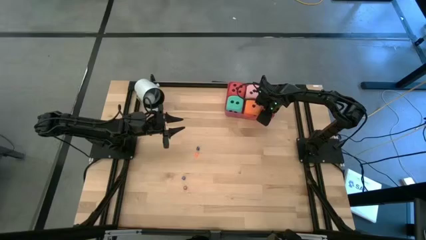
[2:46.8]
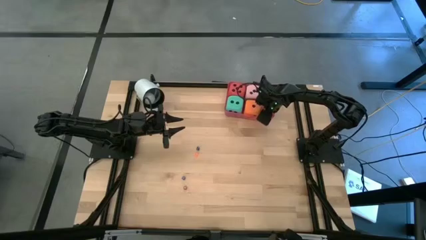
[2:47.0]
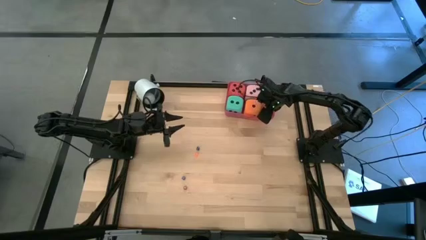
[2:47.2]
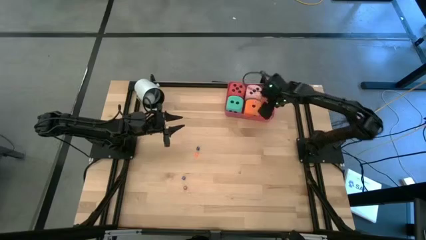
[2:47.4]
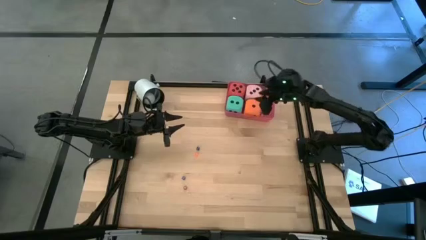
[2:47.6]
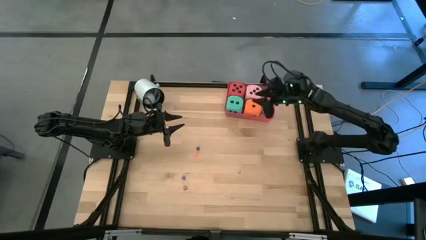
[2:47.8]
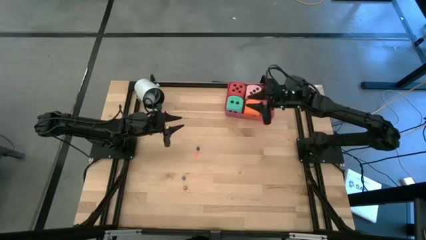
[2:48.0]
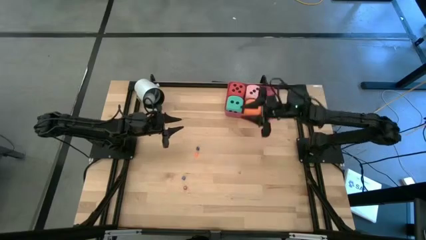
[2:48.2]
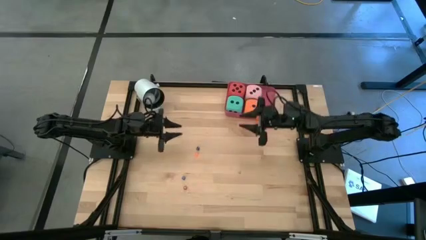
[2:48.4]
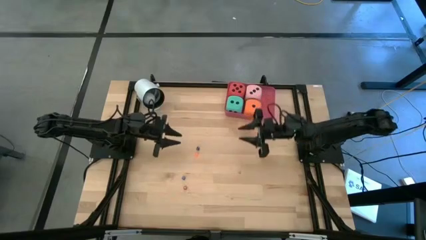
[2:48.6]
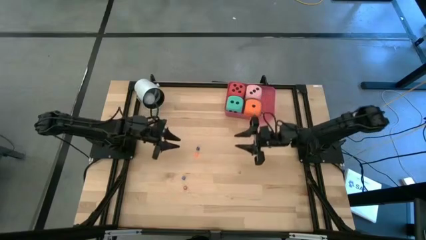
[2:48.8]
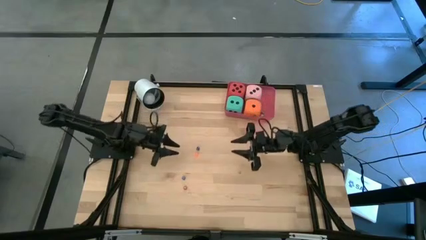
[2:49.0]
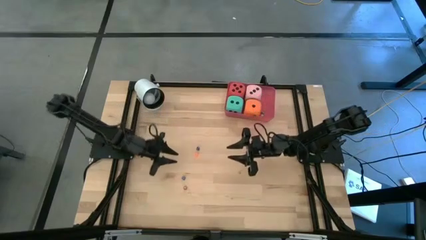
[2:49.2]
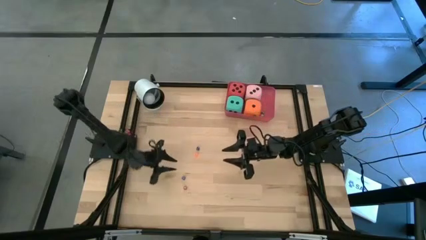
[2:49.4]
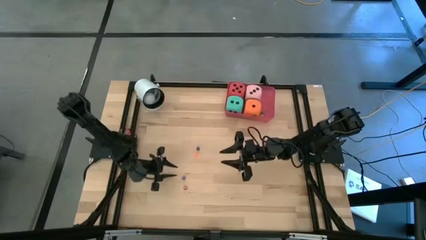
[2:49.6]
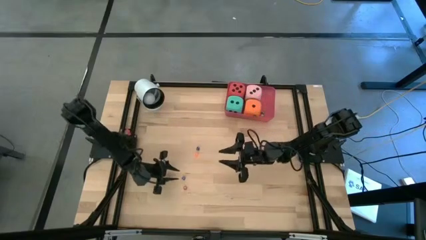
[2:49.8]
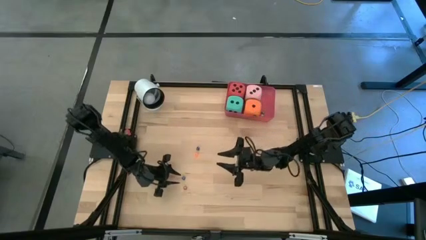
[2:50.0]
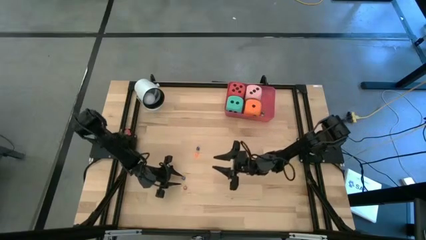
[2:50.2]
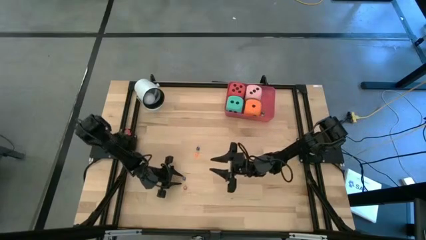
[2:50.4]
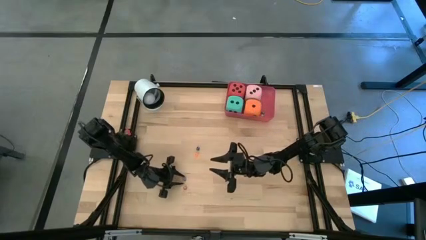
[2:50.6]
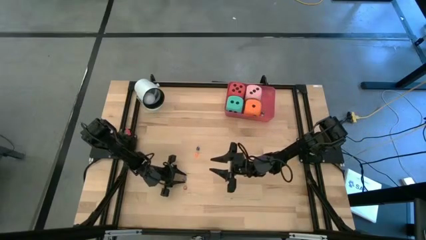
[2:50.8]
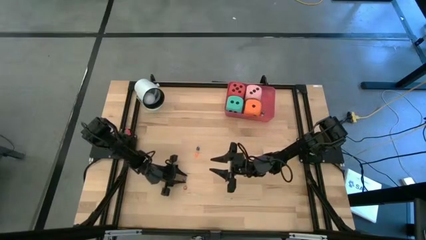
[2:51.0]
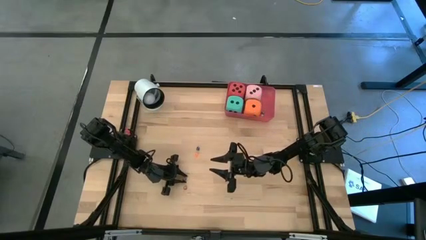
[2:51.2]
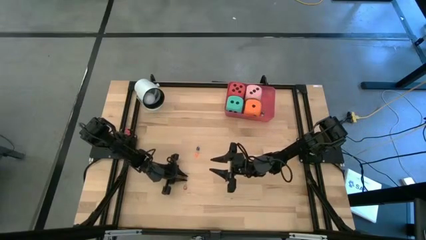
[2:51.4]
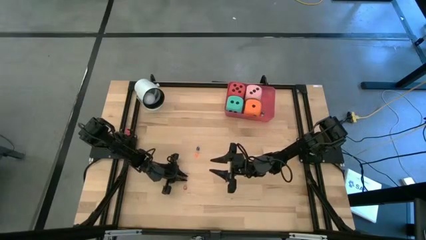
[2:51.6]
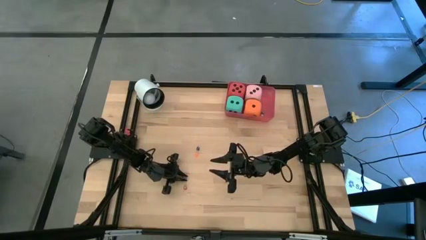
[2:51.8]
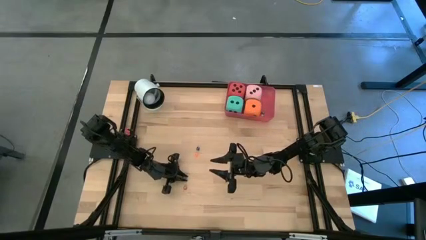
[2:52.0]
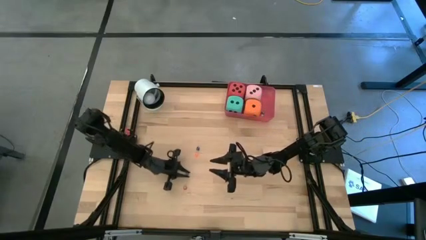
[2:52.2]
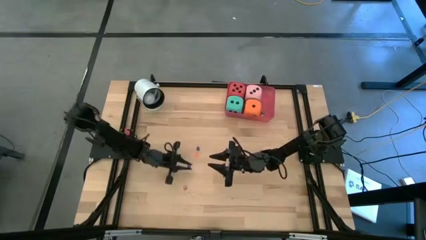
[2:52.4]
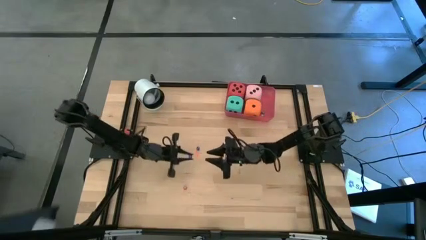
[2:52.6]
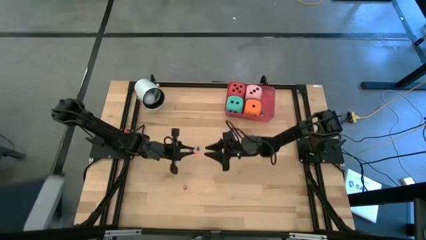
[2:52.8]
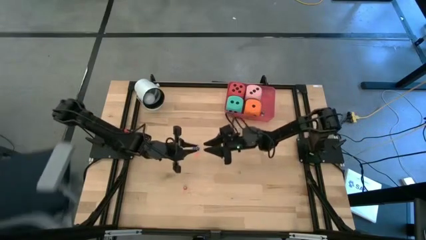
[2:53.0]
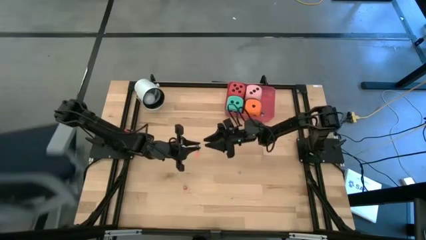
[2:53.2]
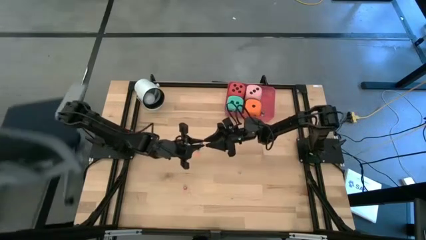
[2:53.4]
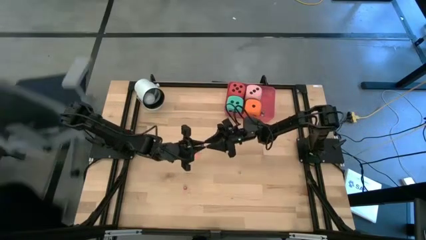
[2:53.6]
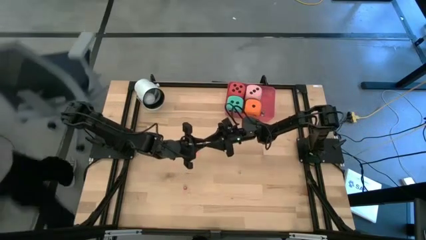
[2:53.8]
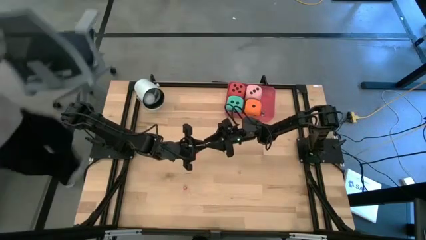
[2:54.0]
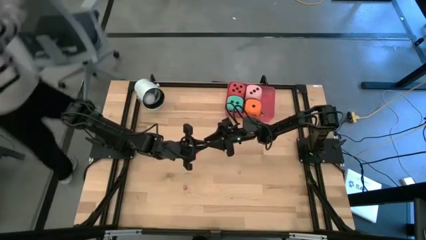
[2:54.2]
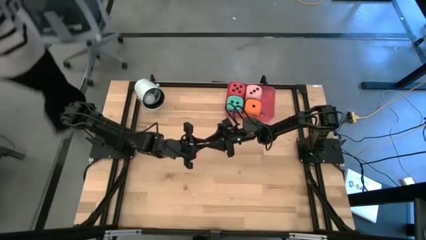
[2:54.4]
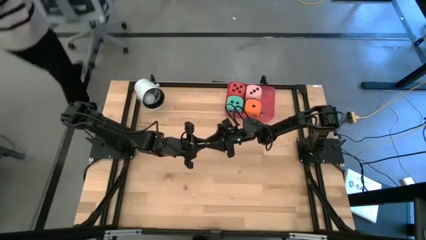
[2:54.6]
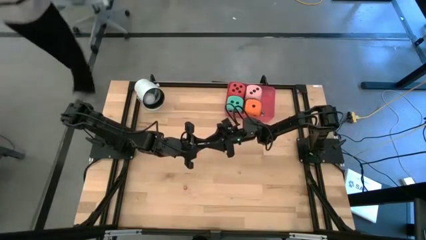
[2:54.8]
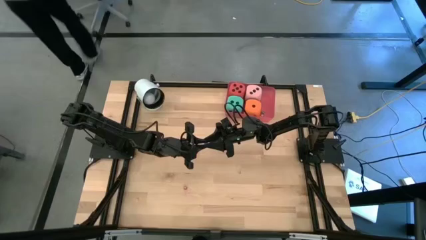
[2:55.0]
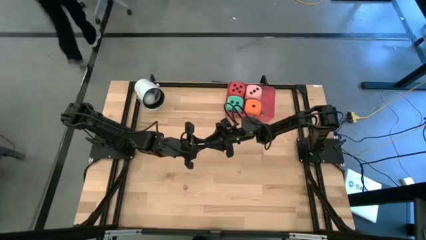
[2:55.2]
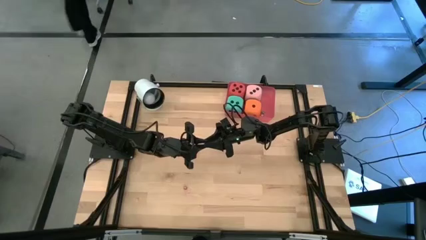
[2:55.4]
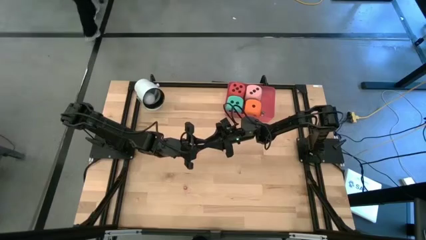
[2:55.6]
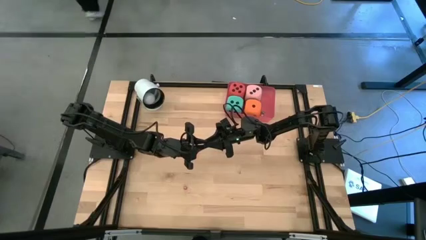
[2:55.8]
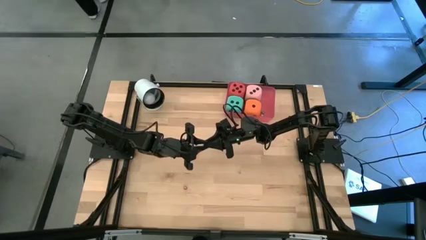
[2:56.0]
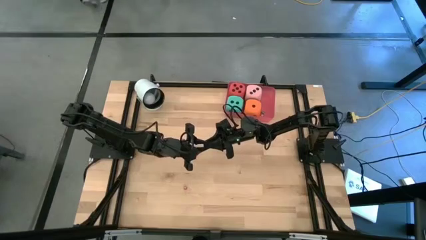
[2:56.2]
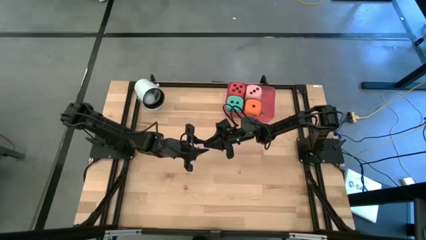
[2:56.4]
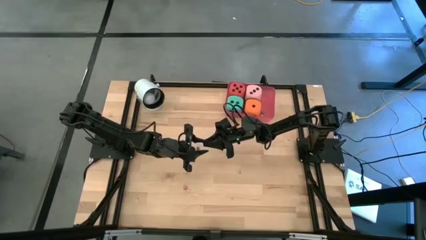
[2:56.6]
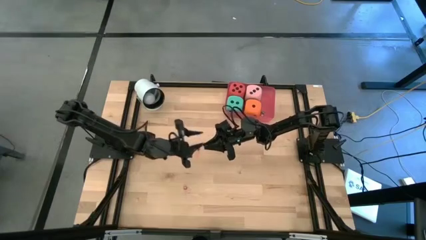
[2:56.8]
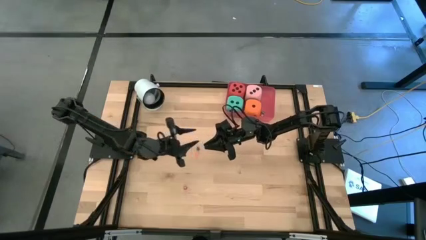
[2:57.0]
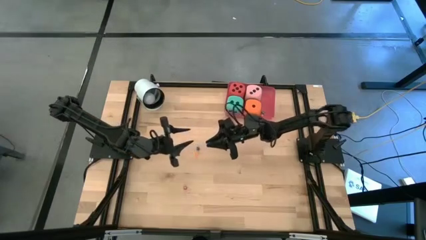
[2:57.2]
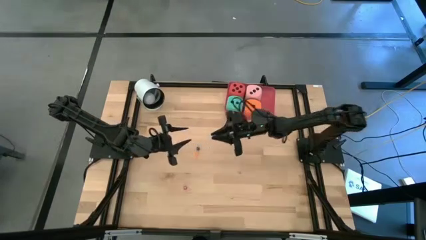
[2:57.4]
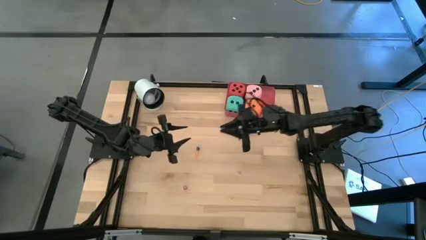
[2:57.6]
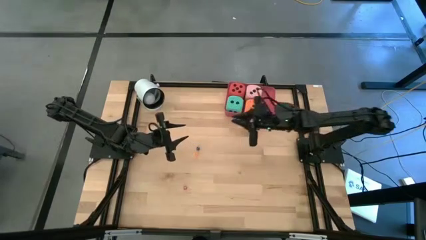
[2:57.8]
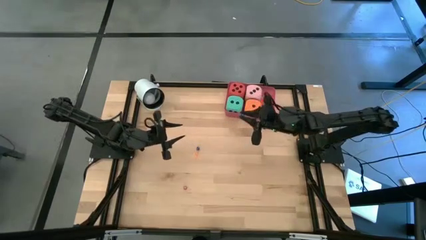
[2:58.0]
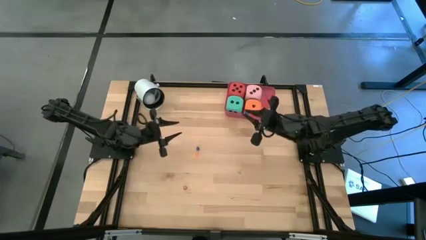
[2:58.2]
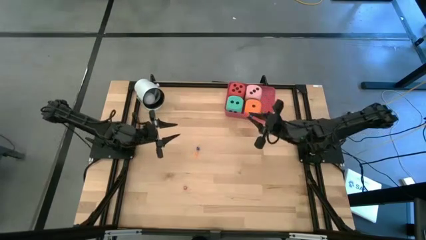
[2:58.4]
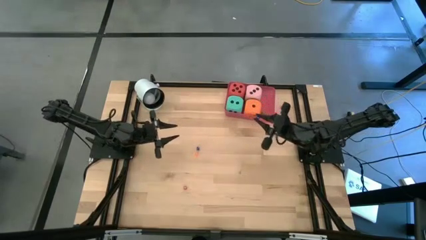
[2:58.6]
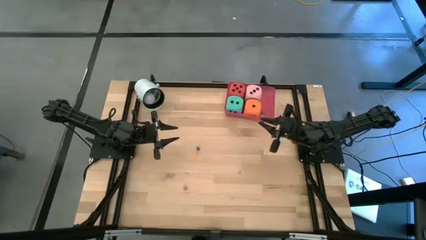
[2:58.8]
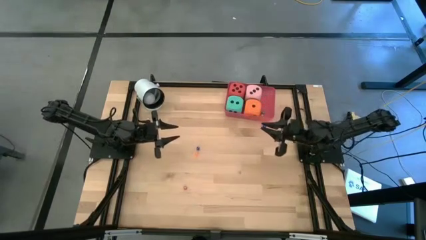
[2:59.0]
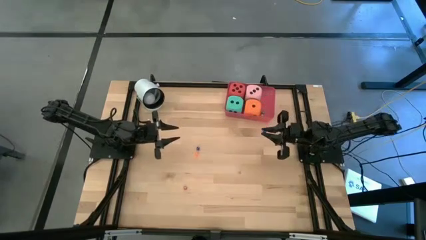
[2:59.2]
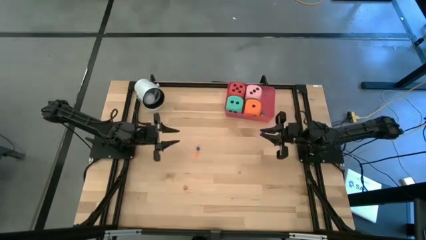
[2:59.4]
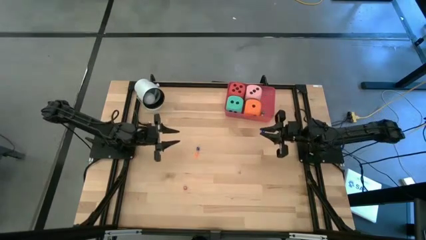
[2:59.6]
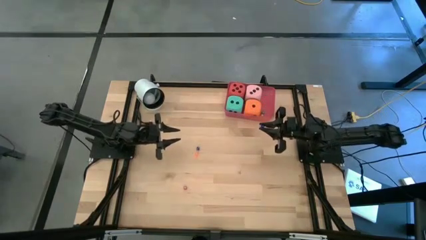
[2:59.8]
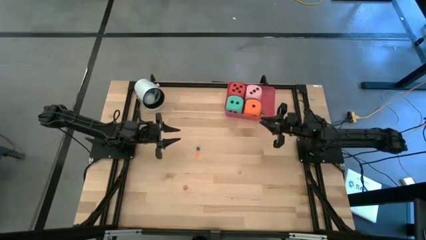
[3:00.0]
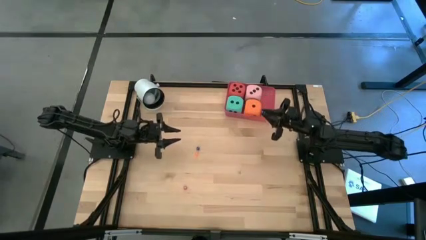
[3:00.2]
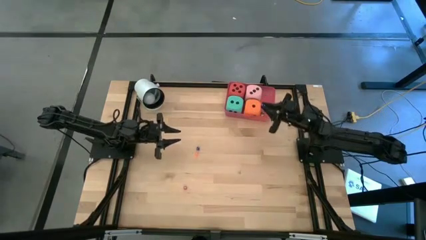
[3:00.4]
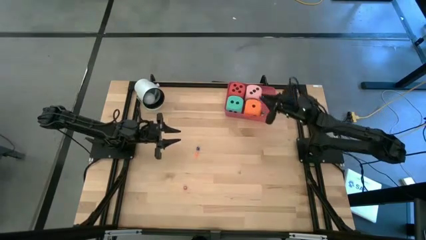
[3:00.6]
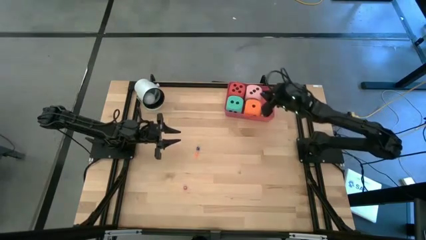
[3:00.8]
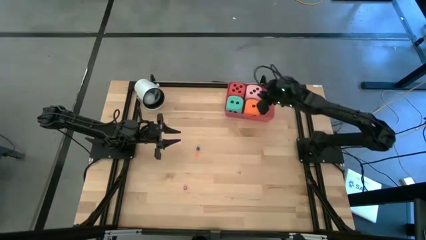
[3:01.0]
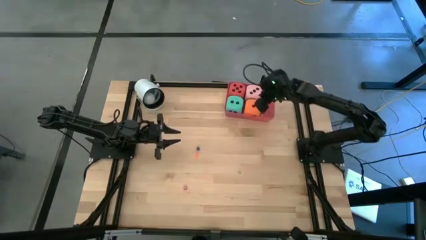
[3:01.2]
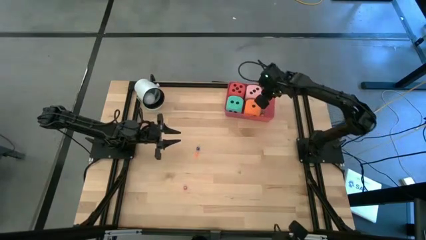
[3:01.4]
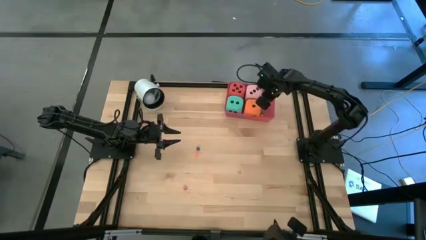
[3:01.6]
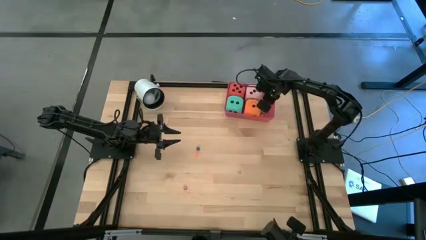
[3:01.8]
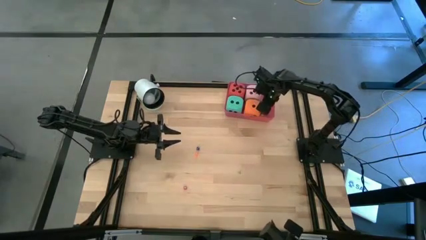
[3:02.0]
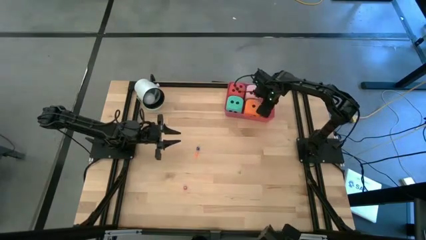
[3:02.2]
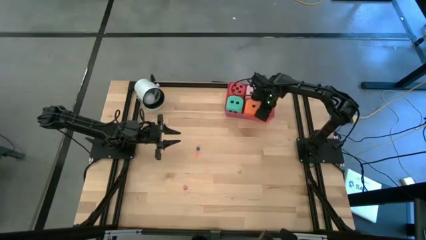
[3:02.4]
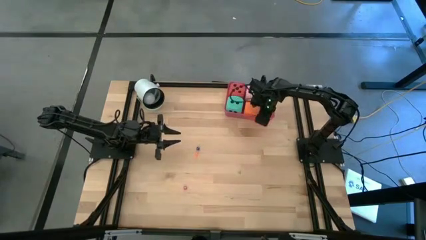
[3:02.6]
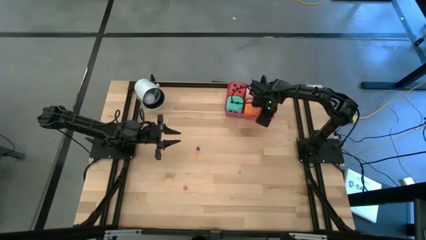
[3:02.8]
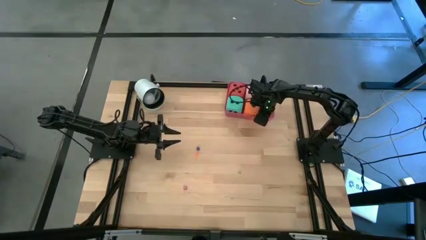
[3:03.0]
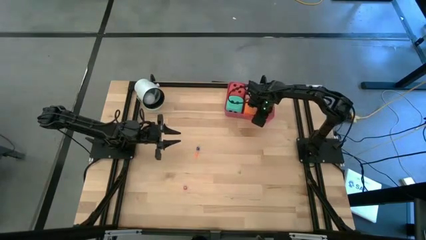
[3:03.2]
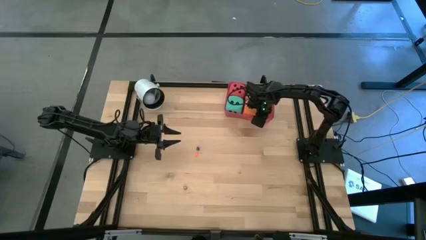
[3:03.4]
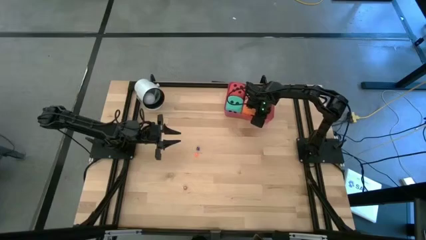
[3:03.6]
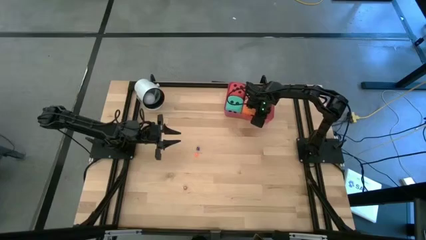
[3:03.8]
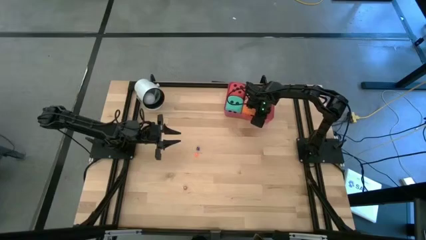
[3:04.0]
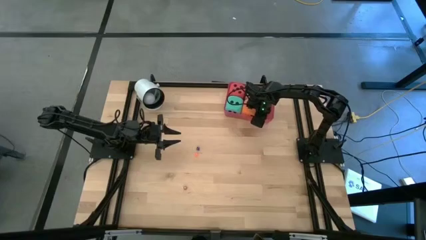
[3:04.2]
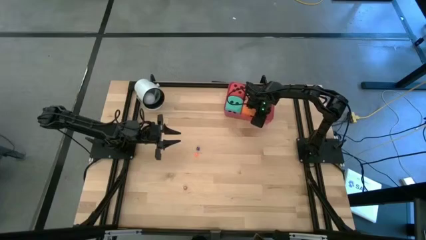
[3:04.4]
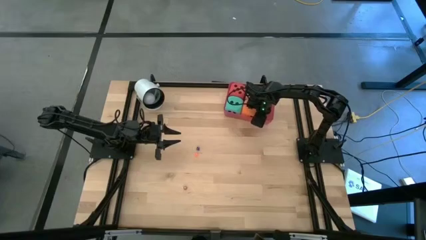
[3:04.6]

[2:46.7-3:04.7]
Task: Pick & Place Dice
Put the bottom small blue dice into the red bin
